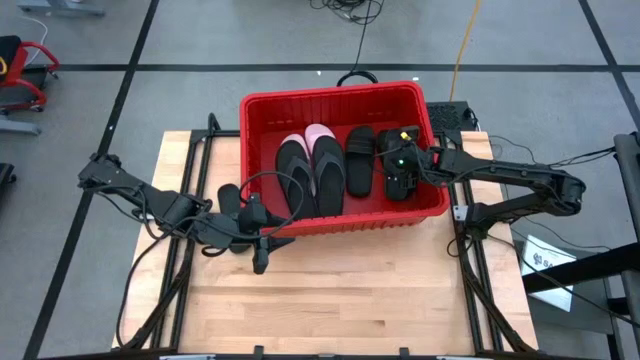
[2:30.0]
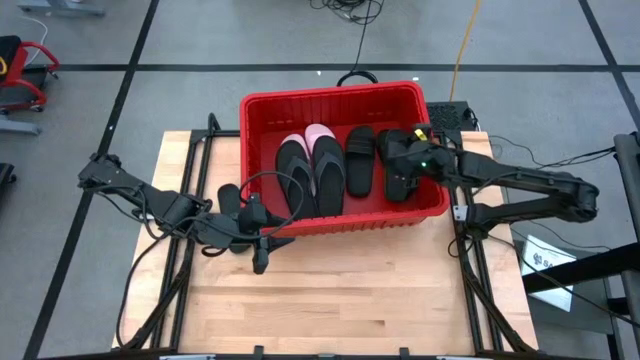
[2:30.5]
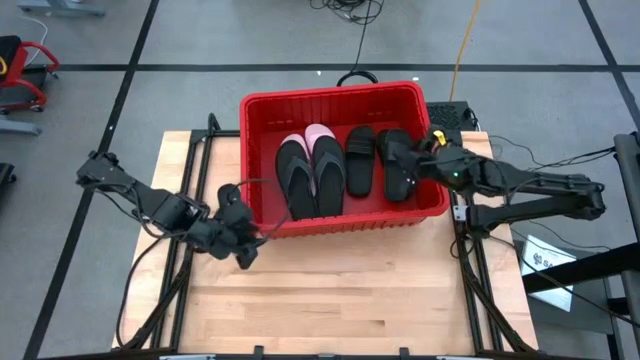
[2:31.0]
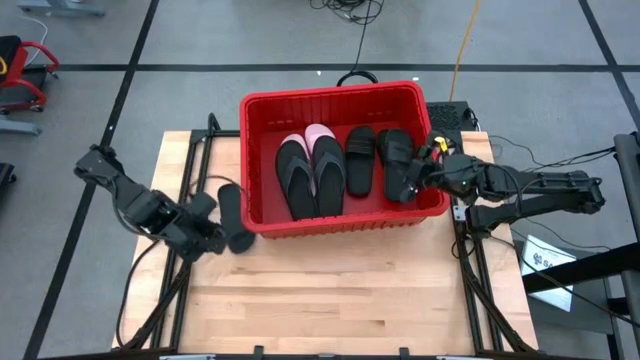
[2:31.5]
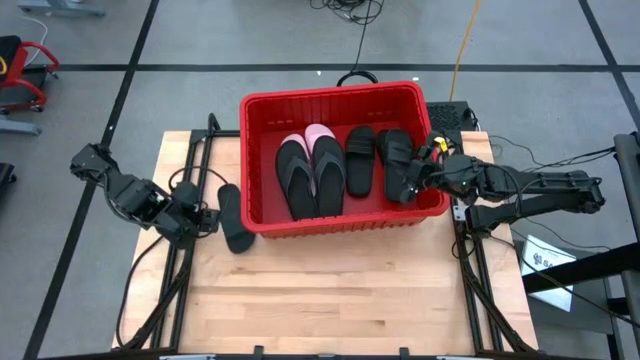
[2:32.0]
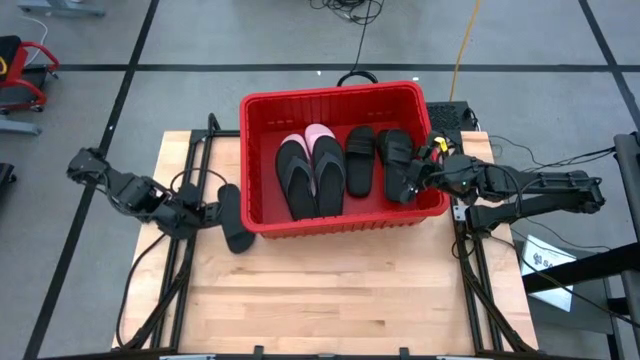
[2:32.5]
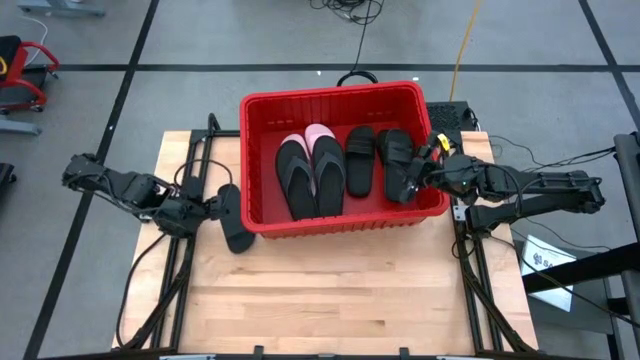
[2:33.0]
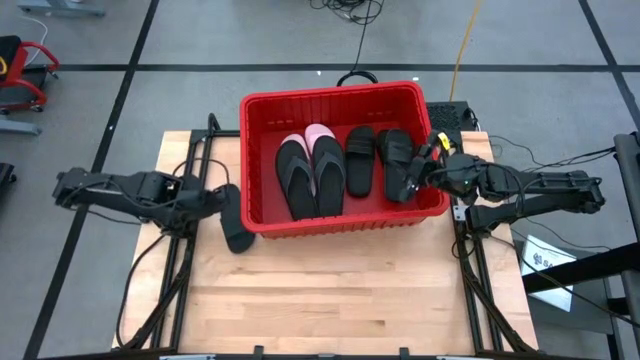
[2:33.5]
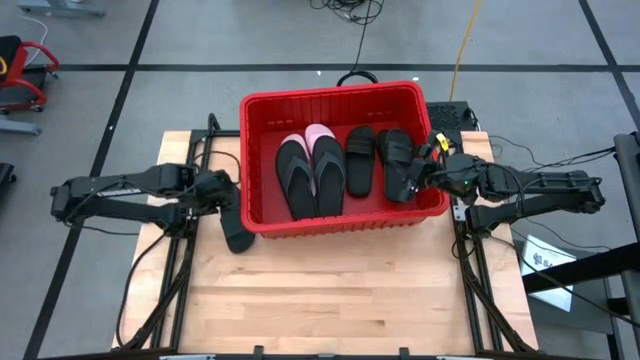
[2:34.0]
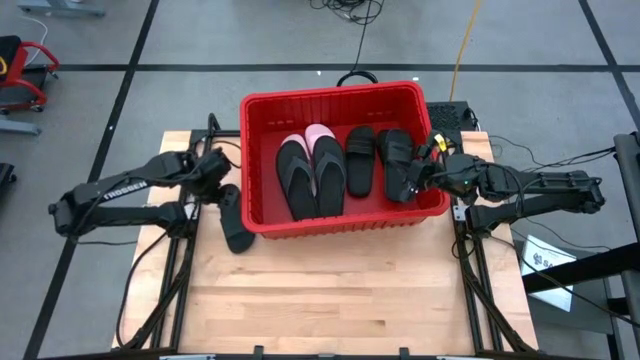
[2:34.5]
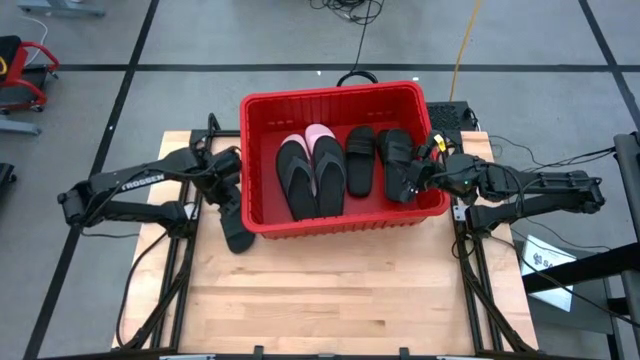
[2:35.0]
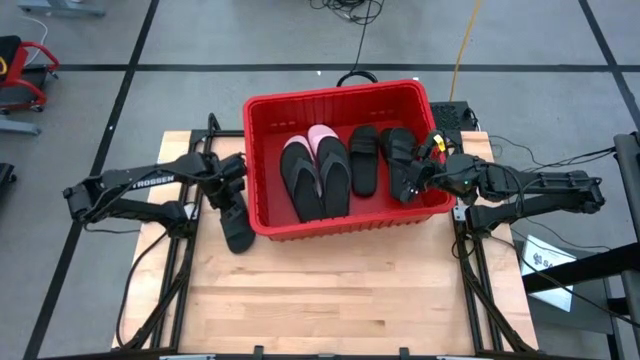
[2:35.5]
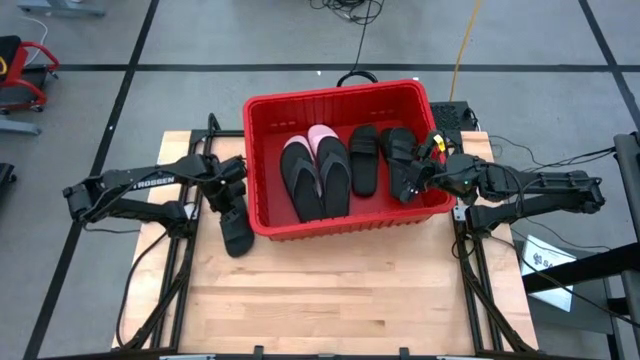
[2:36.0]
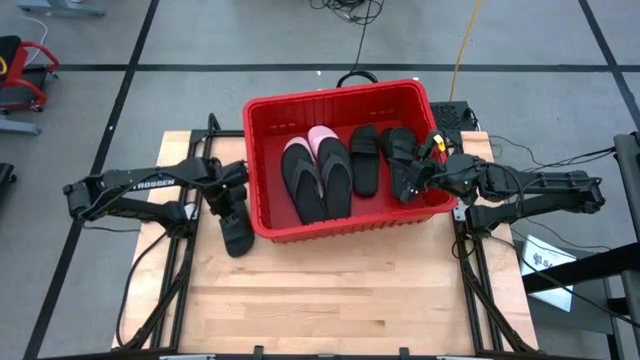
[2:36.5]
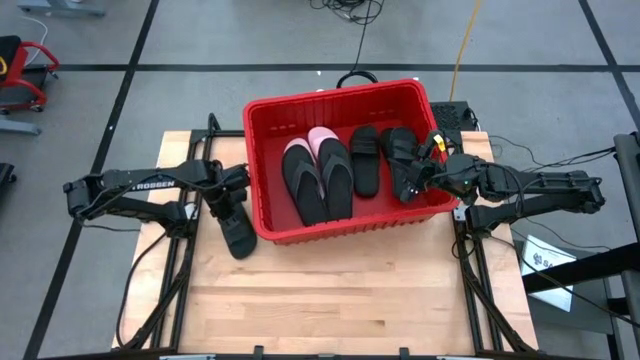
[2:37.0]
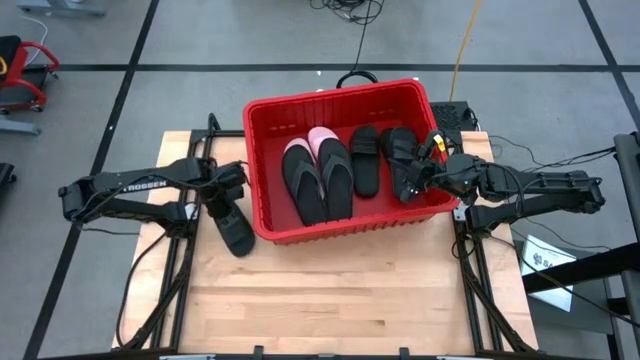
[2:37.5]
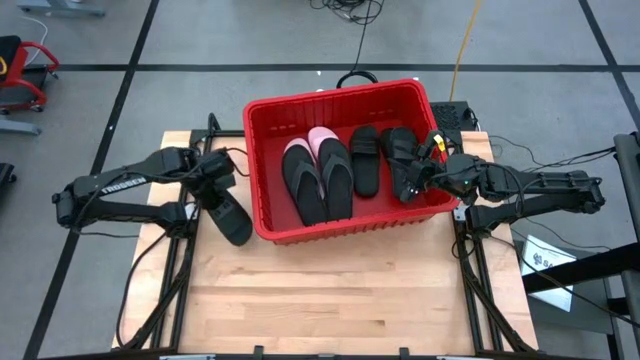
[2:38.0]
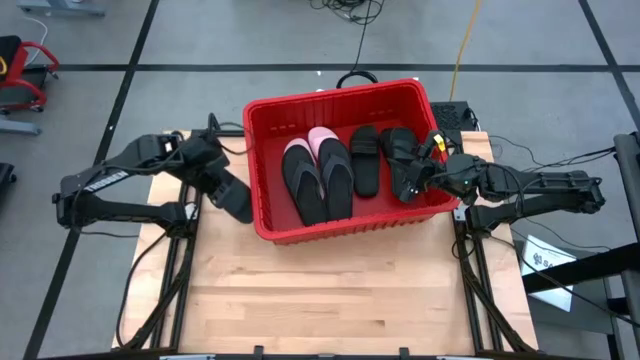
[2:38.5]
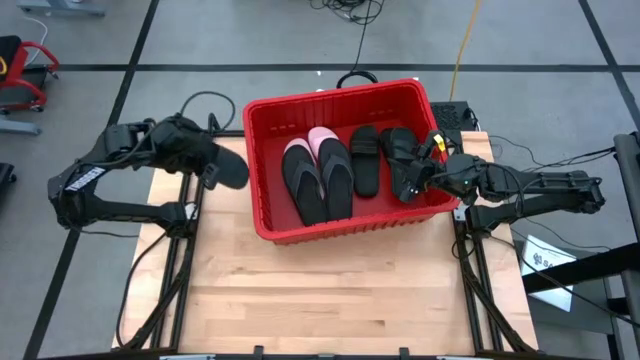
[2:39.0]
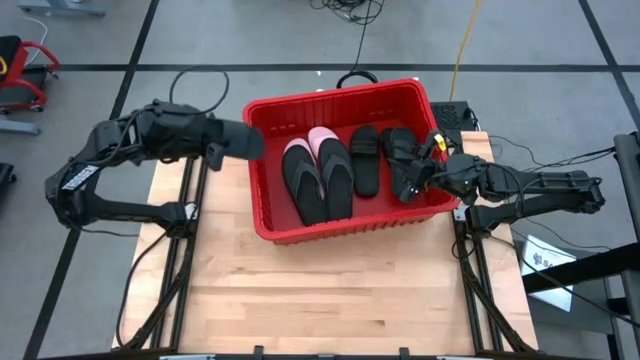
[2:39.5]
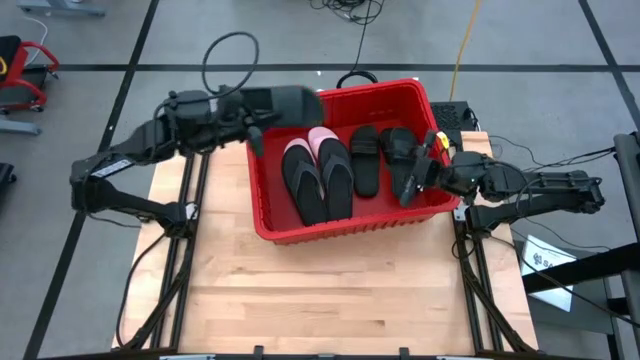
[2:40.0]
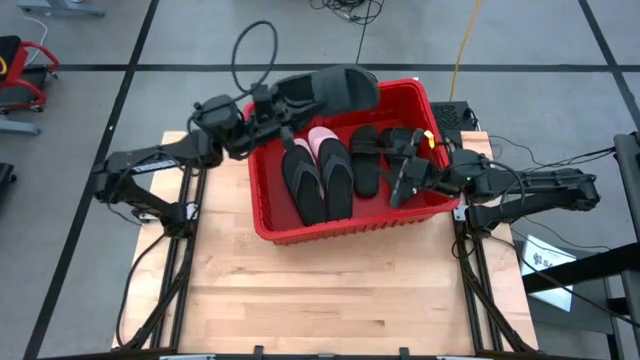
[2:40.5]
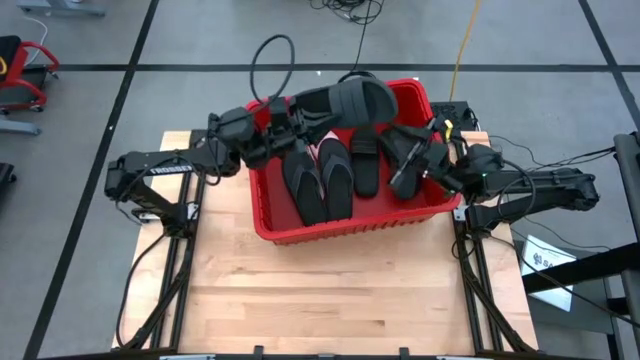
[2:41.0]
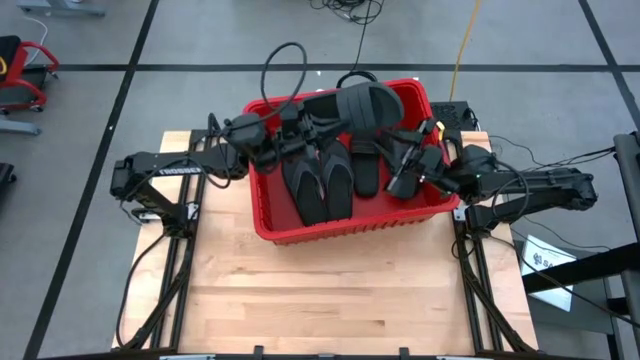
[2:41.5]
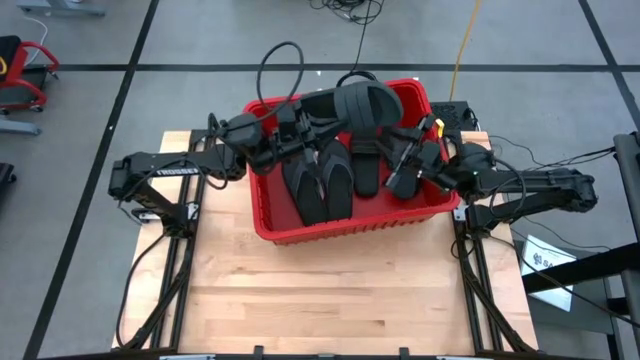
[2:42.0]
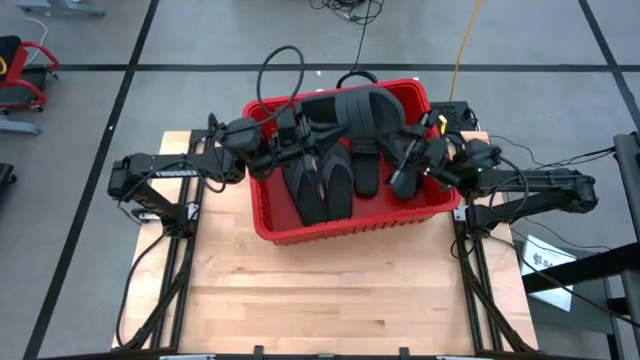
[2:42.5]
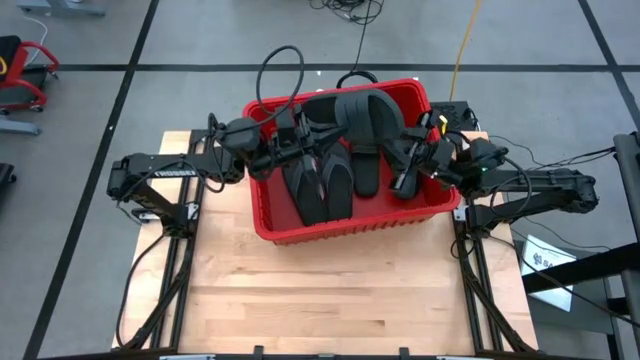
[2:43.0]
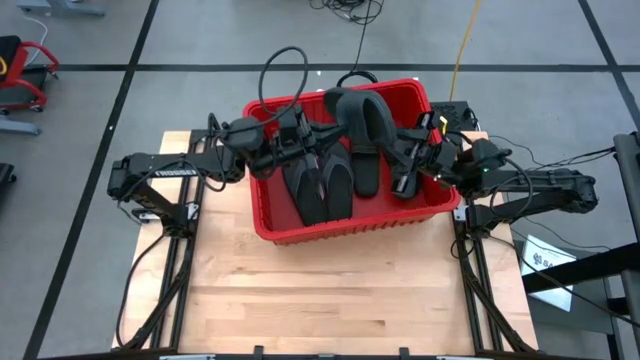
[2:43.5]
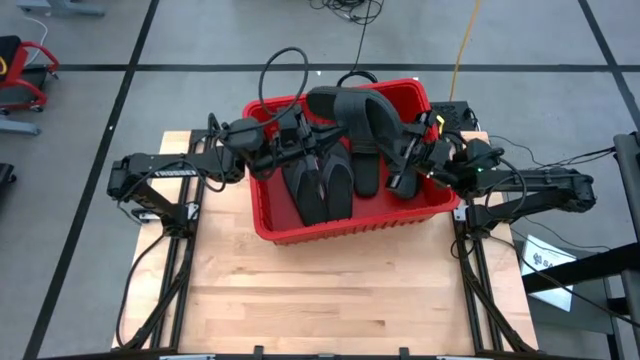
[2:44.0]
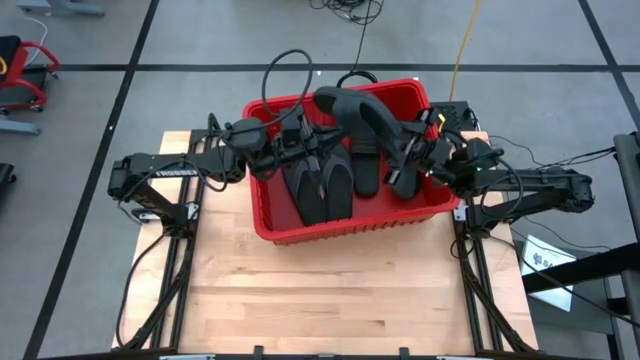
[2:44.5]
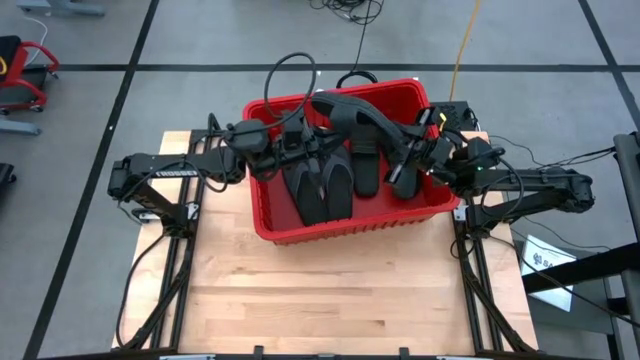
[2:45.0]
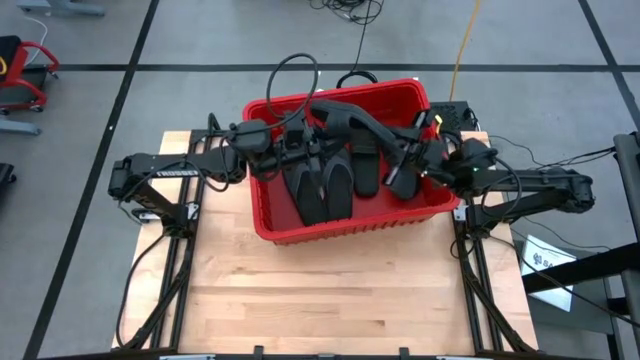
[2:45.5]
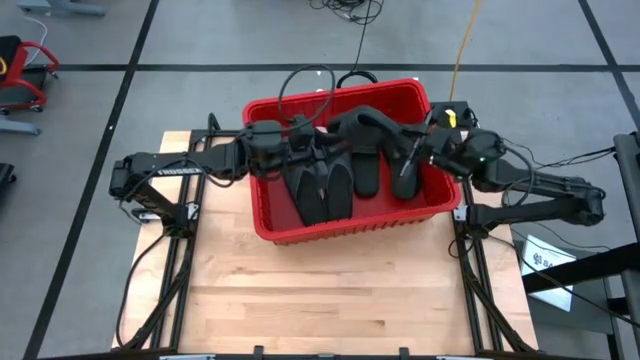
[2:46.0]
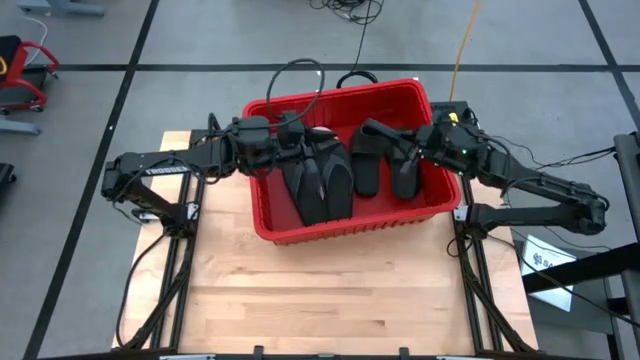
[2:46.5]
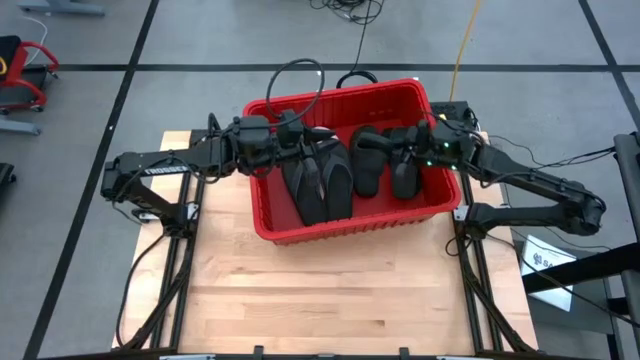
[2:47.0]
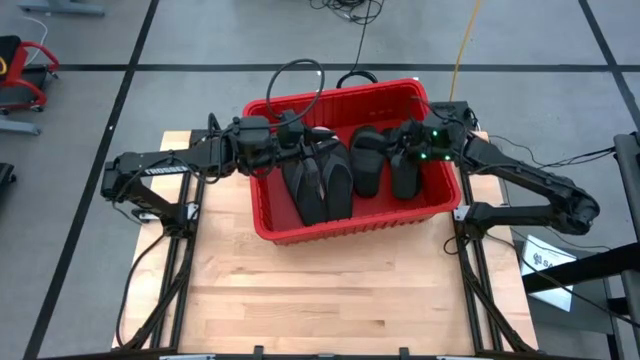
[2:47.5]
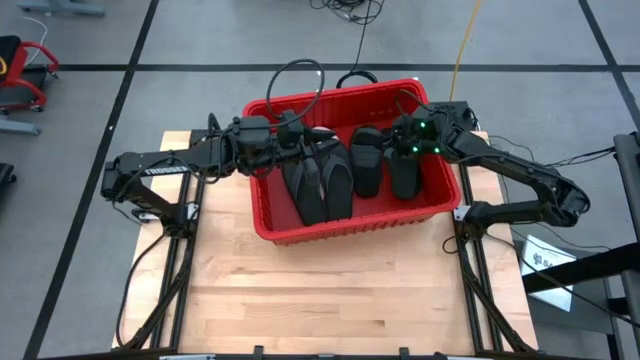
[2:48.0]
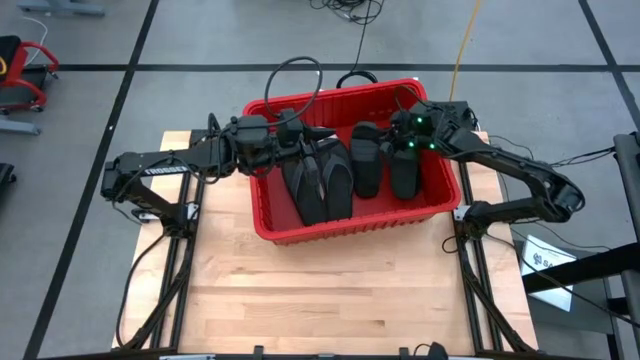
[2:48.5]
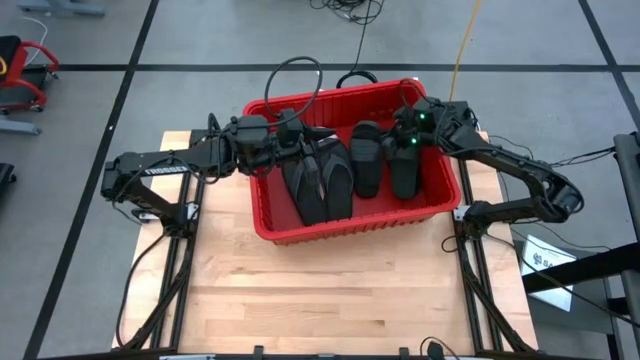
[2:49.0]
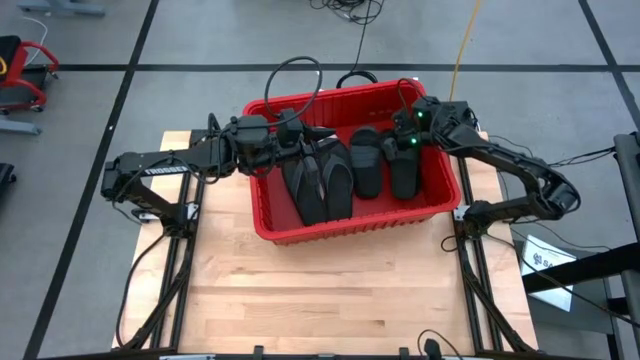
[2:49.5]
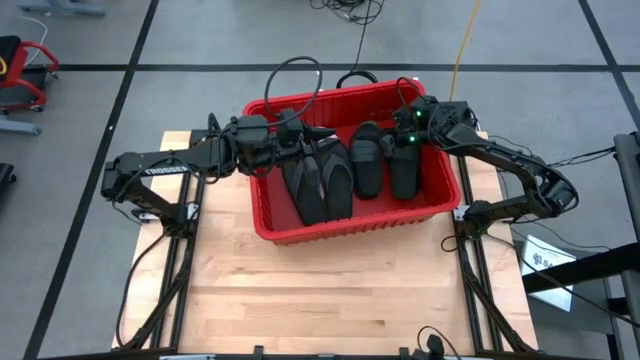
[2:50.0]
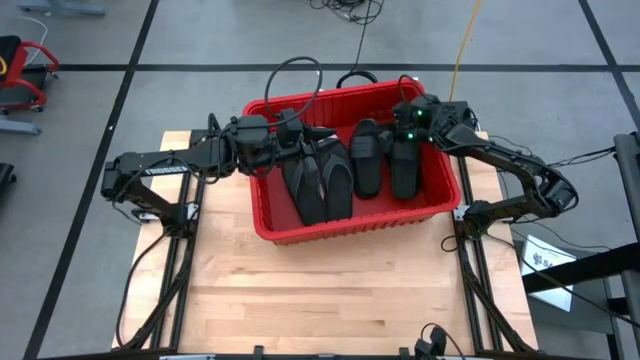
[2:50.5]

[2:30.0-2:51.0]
Task: Pick and place slides into bin
Put the black slide into the red bin
